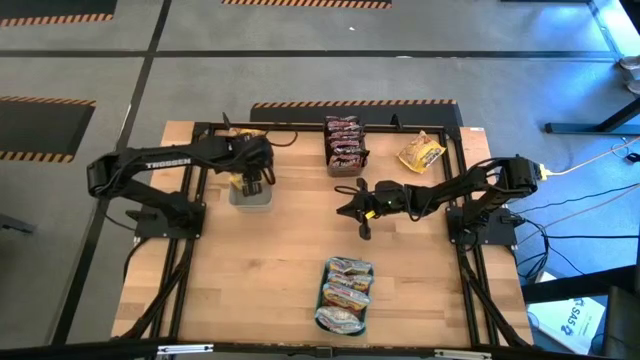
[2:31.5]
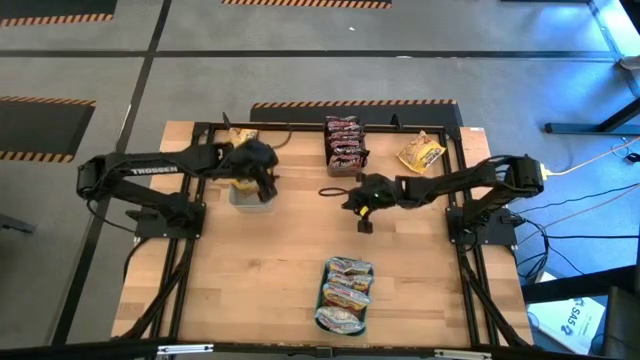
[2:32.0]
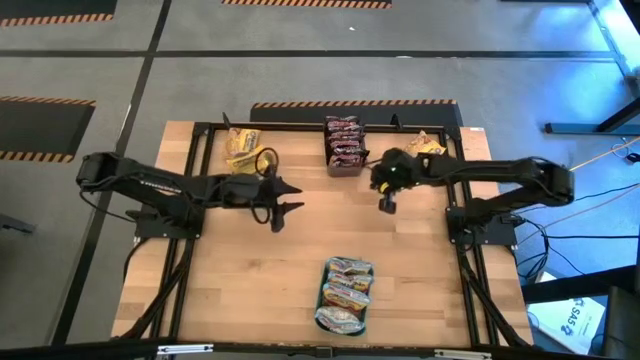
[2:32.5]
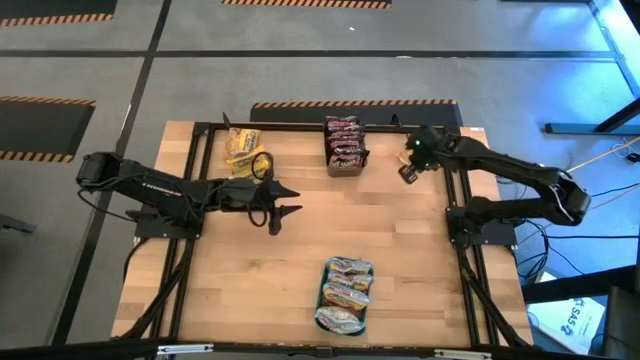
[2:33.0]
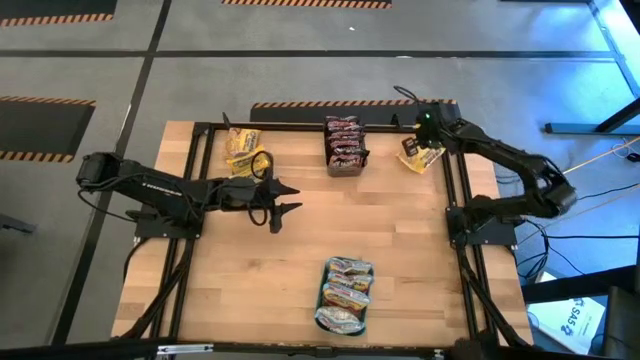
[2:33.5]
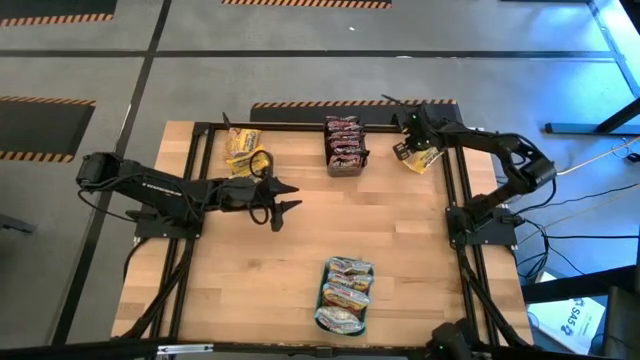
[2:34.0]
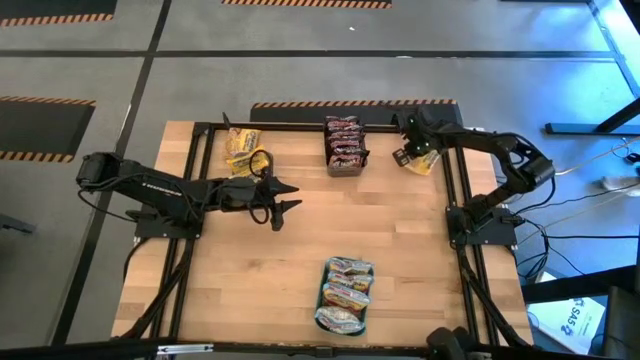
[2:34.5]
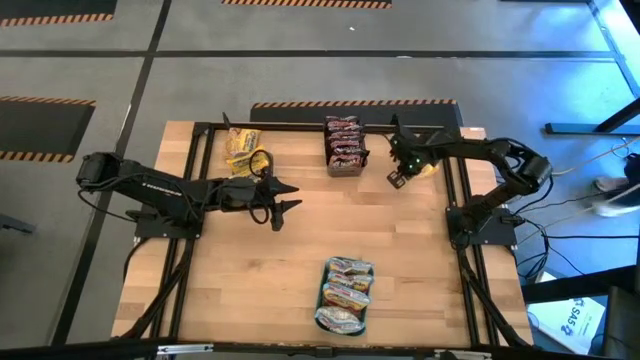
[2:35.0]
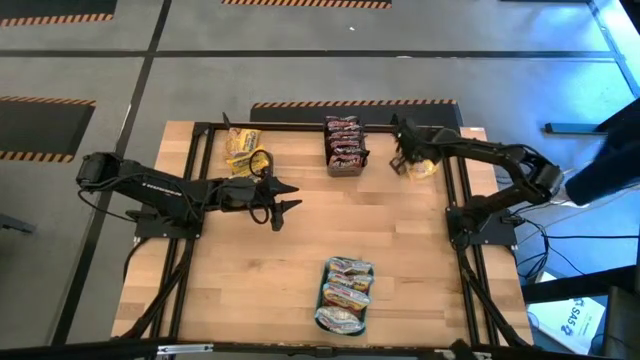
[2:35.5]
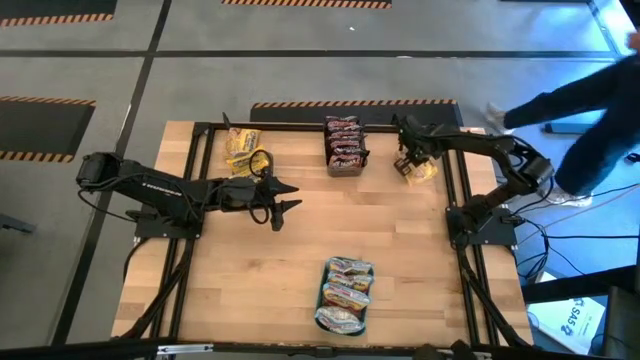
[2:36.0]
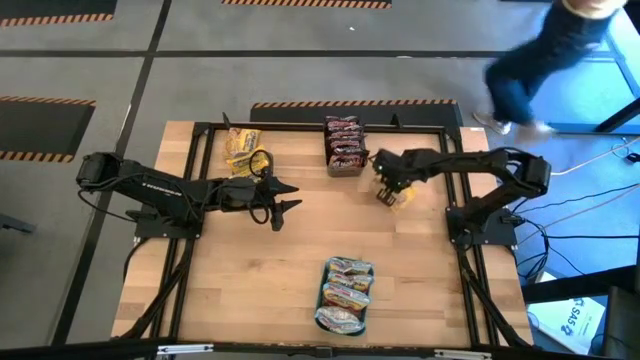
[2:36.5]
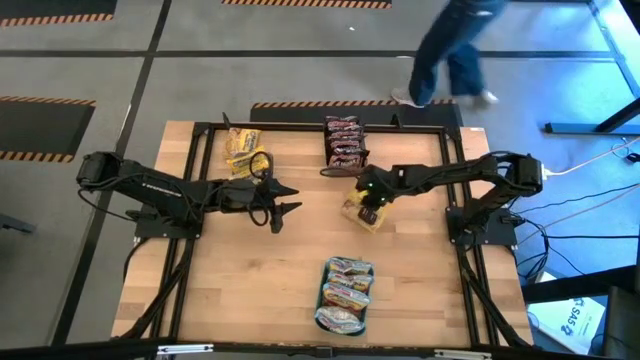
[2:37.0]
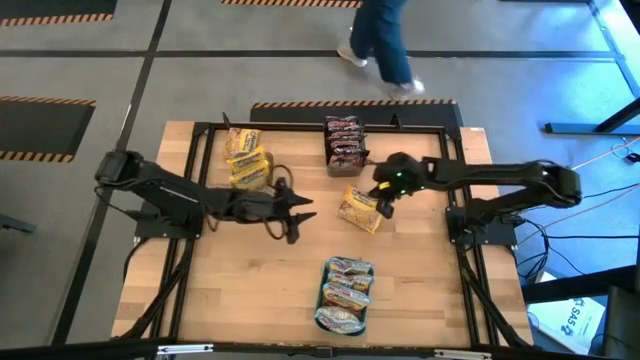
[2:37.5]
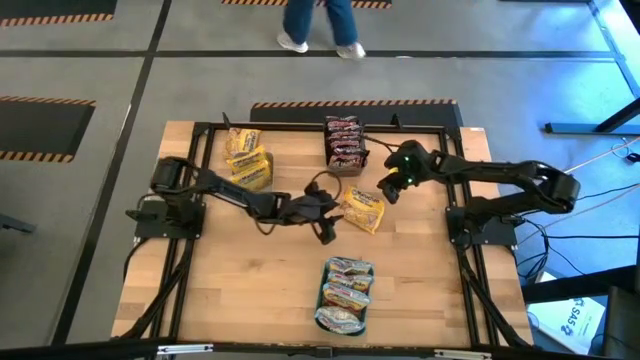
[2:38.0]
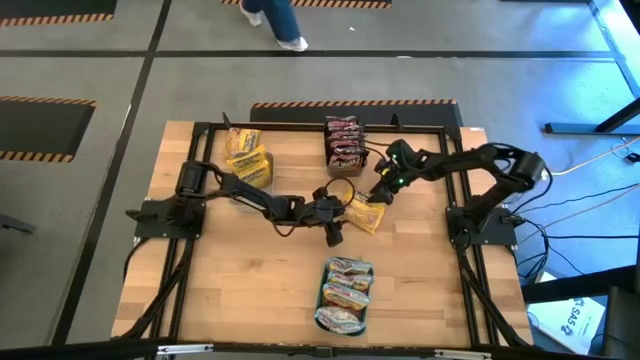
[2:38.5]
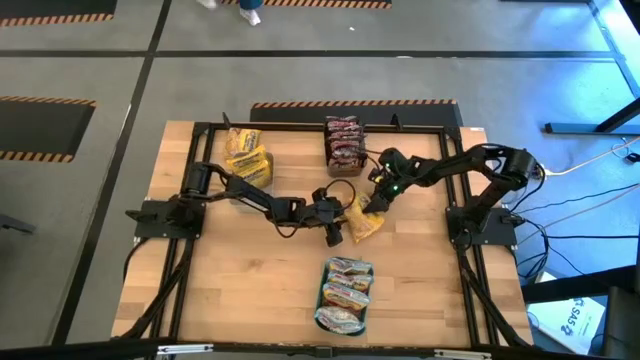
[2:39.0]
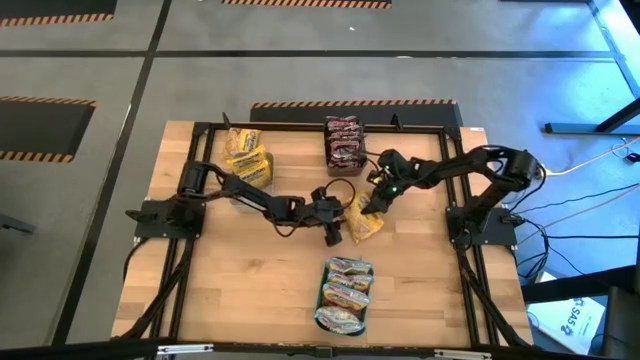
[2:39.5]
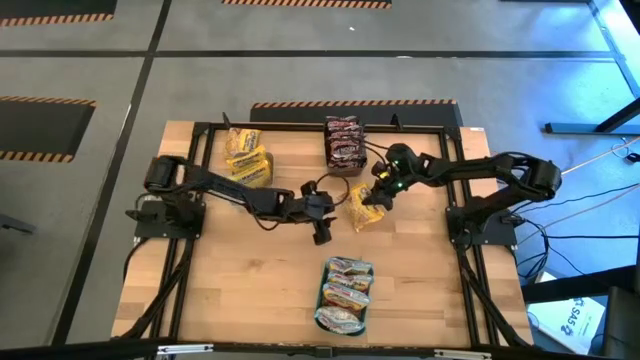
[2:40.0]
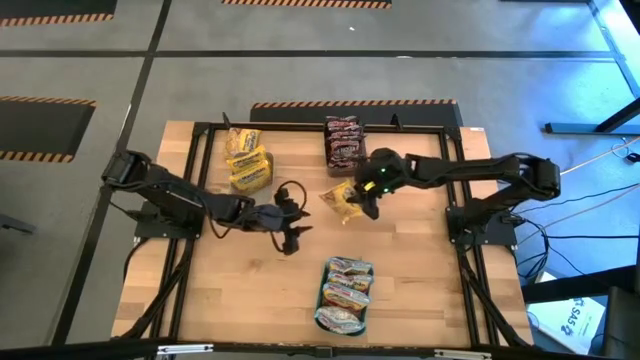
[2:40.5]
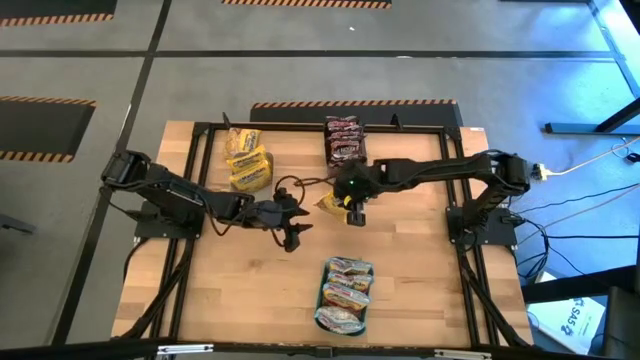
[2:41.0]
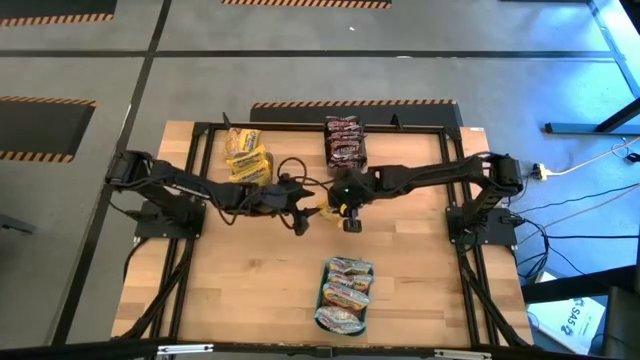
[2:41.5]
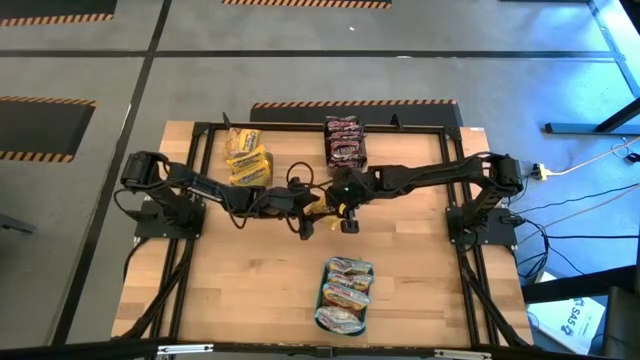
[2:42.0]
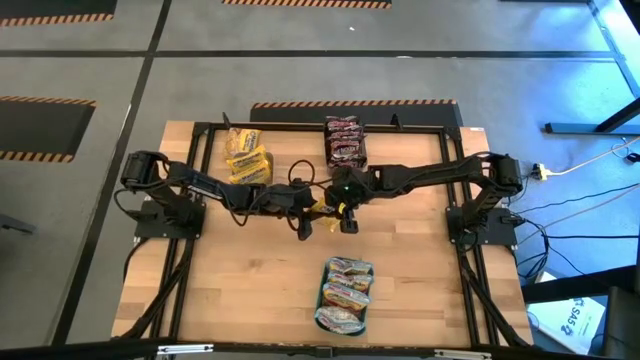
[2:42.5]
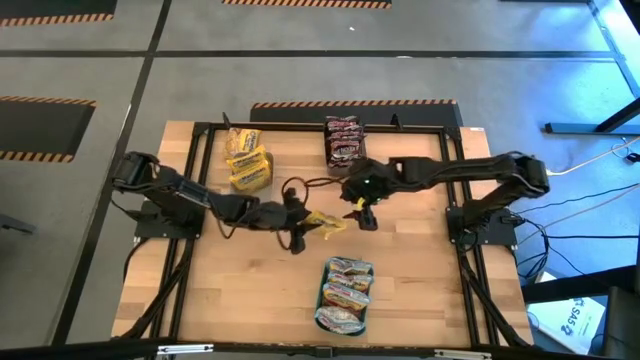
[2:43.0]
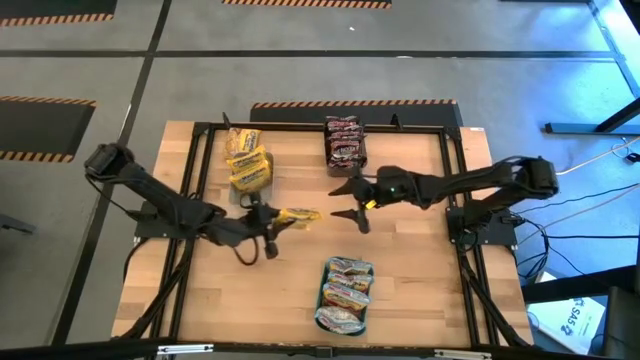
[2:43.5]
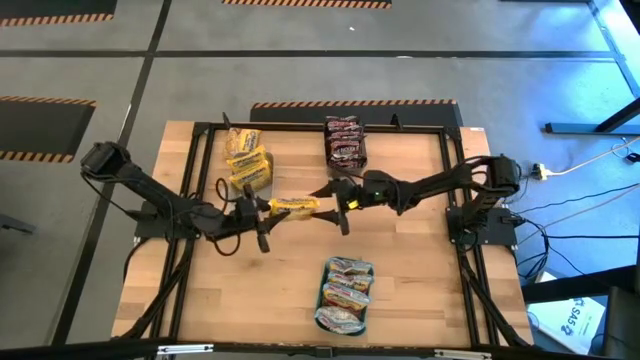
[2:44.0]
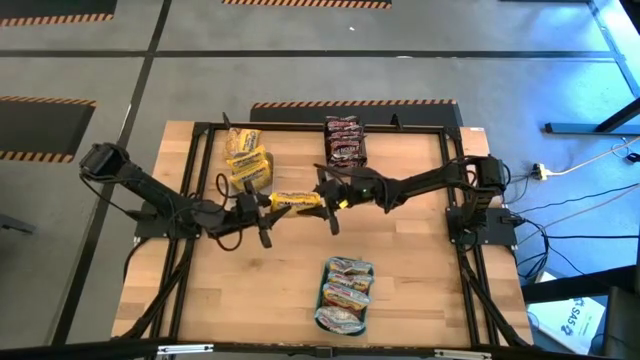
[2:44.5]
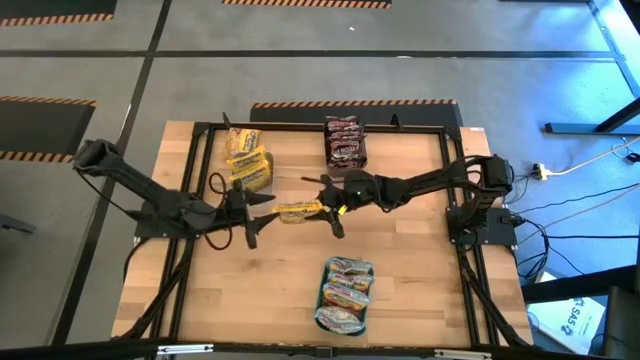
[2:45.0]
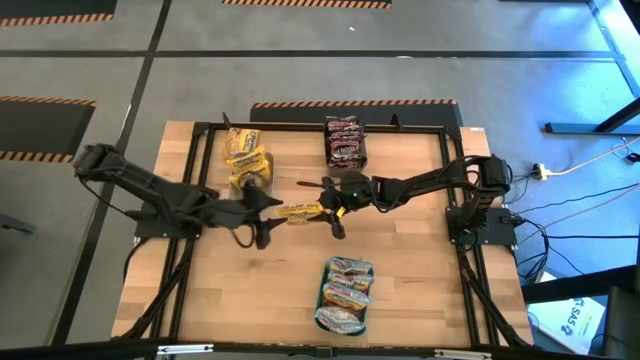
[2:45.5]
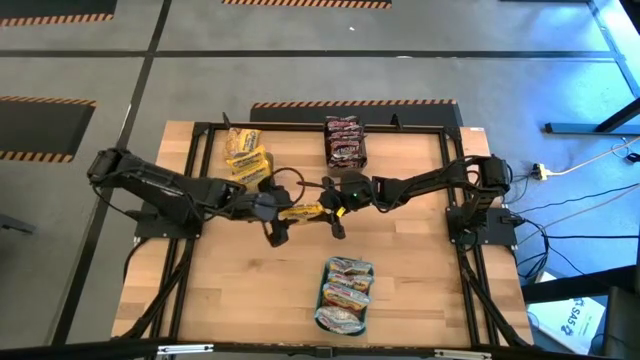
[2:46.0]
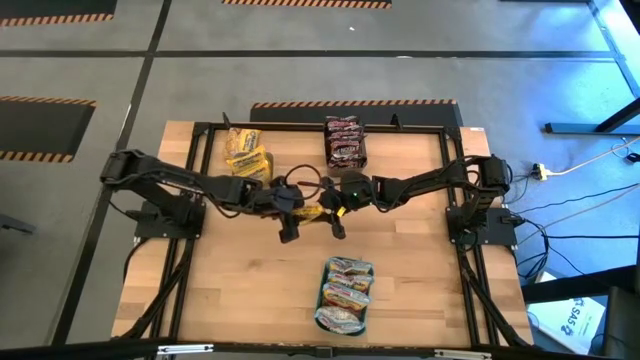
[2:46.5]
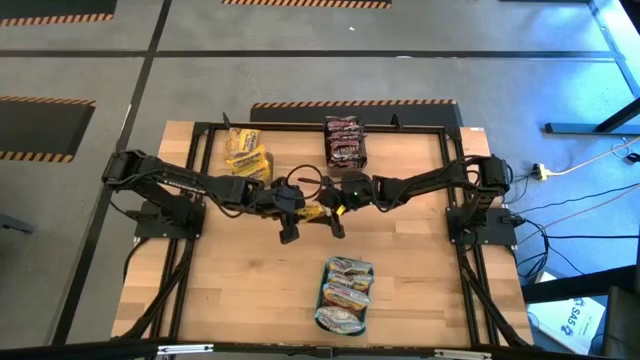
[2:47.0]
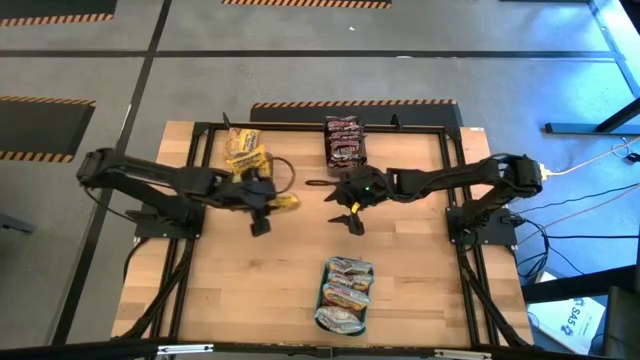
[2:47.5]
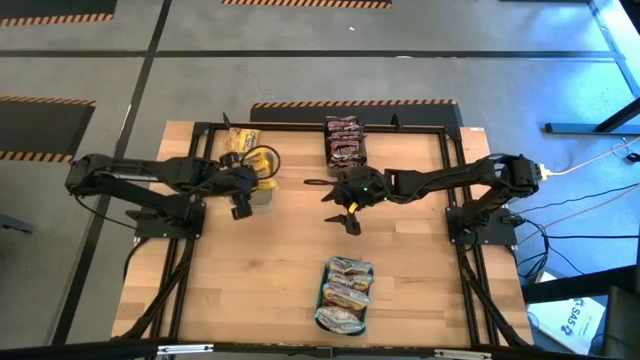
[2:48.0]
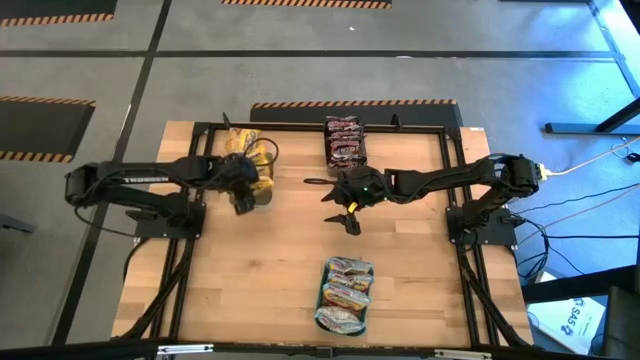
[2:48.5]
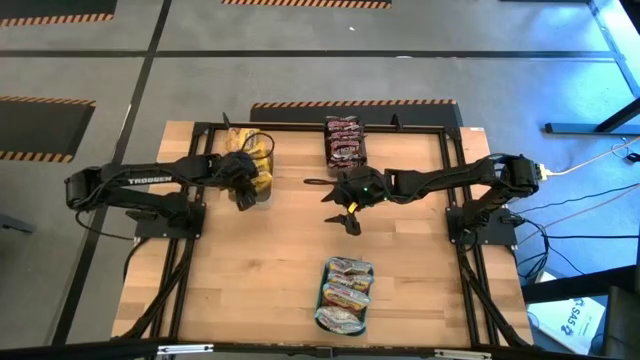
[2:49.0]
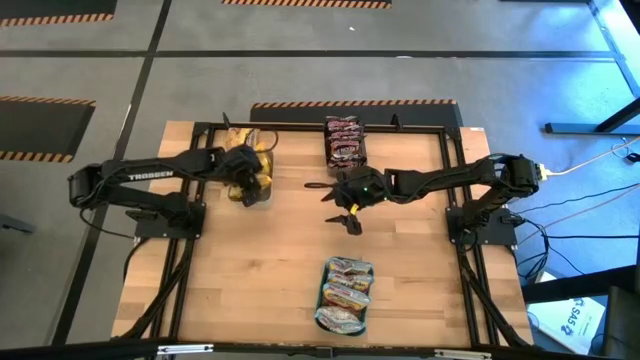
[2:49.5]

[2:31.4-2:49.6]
Task: Sort Maruchan noodles
Put the yellow noodle pack into the white bin
